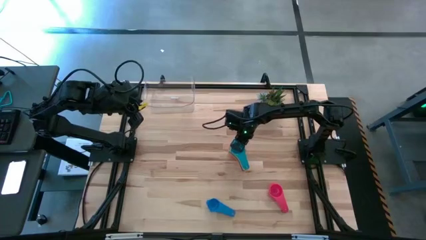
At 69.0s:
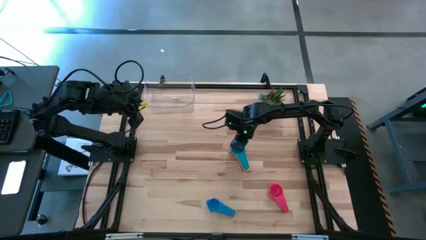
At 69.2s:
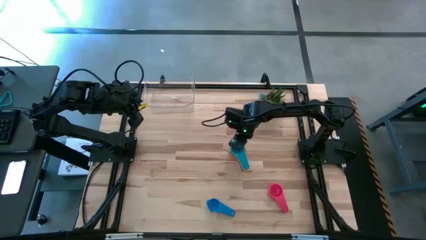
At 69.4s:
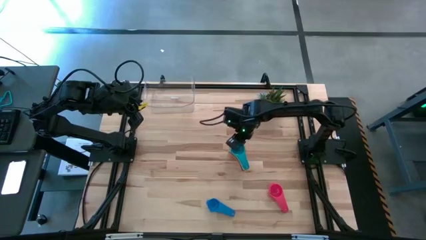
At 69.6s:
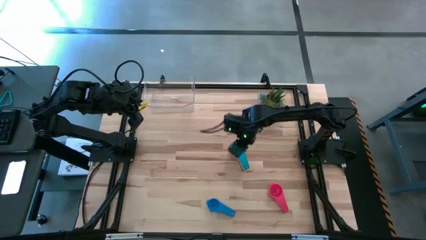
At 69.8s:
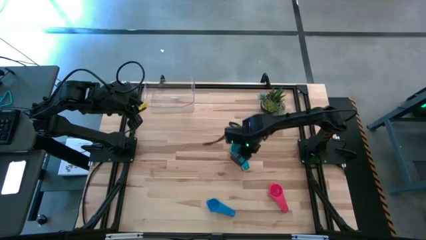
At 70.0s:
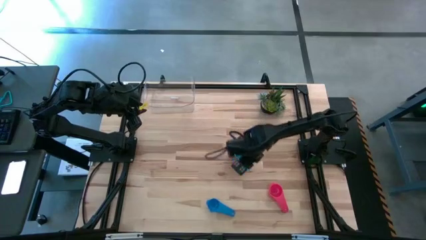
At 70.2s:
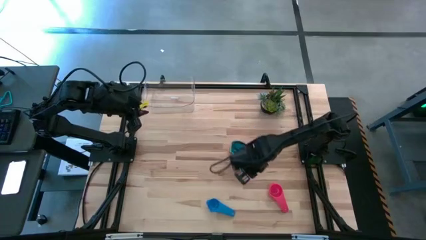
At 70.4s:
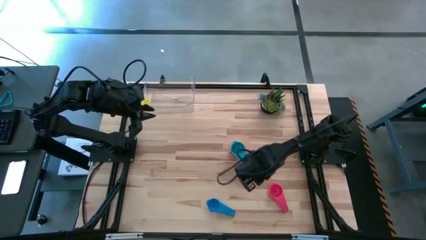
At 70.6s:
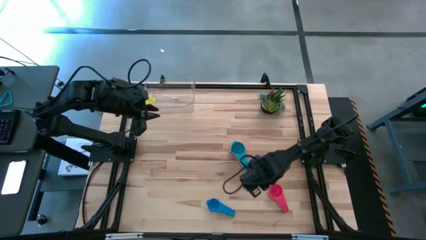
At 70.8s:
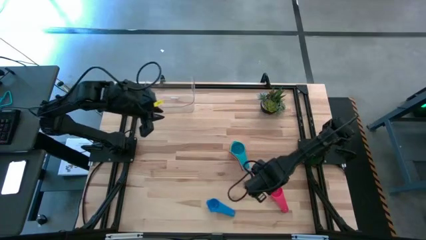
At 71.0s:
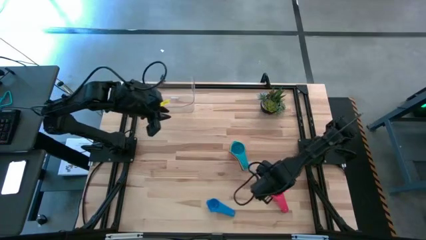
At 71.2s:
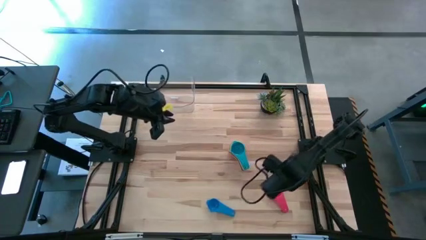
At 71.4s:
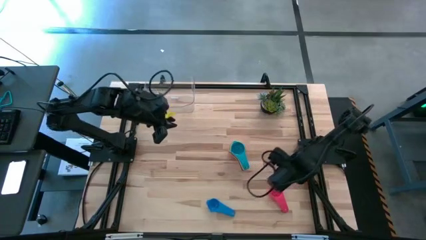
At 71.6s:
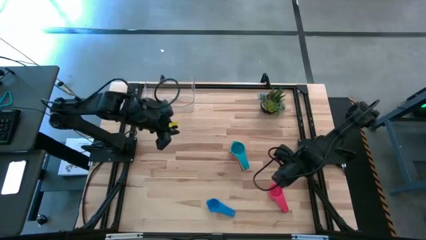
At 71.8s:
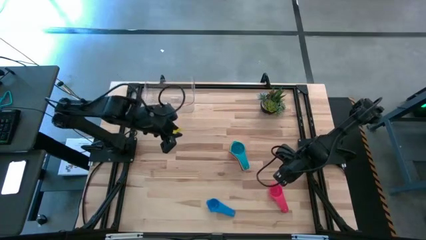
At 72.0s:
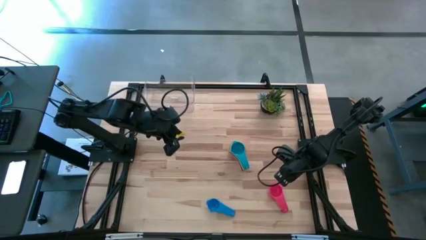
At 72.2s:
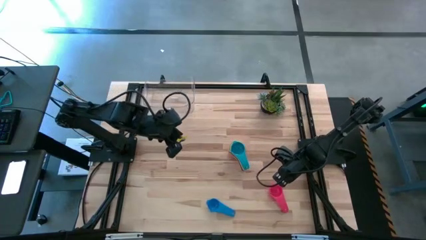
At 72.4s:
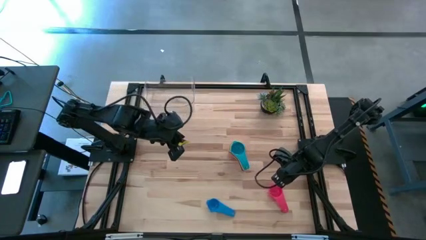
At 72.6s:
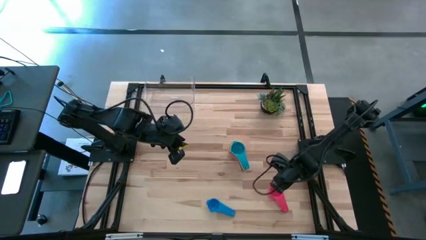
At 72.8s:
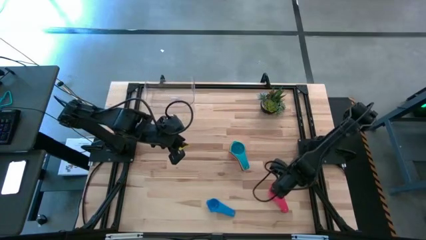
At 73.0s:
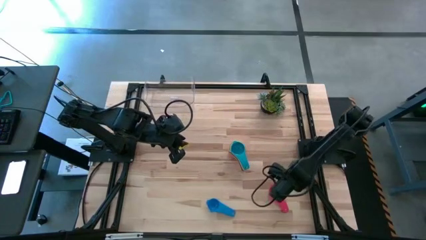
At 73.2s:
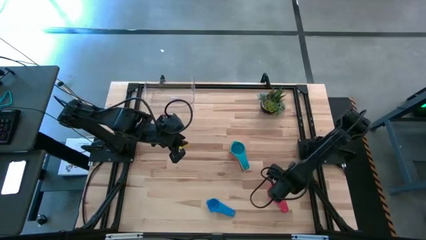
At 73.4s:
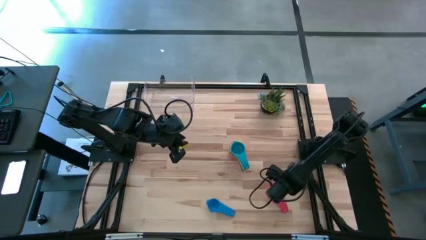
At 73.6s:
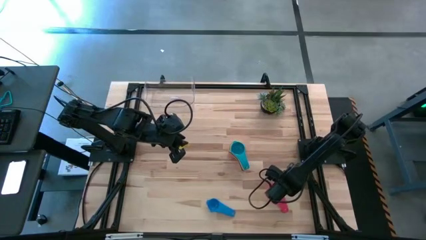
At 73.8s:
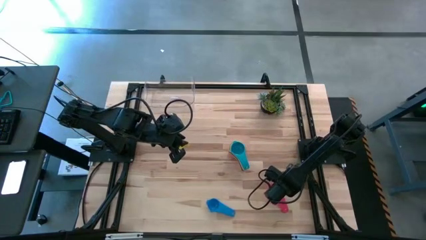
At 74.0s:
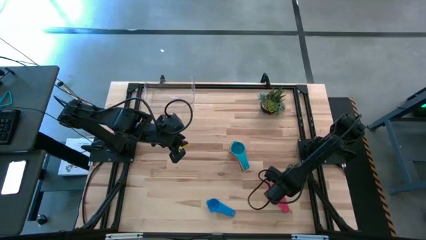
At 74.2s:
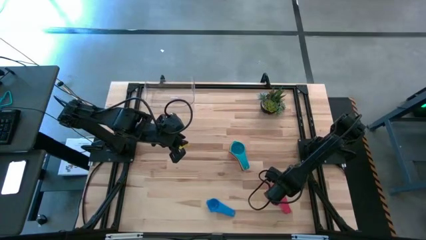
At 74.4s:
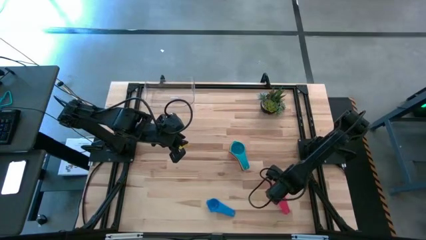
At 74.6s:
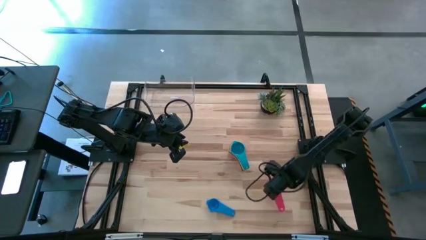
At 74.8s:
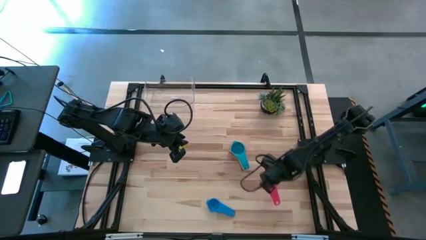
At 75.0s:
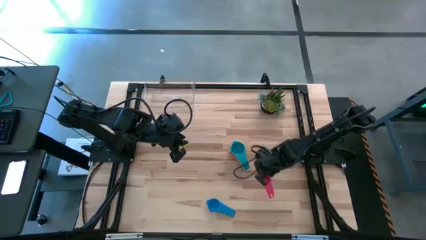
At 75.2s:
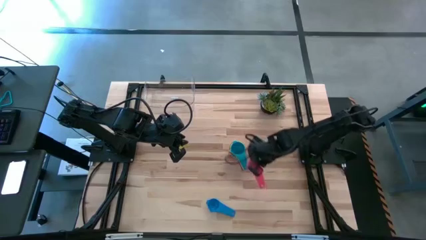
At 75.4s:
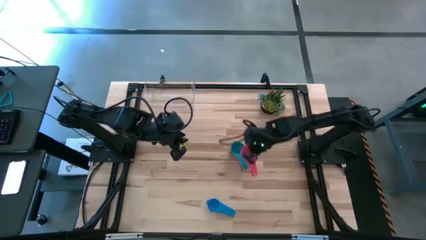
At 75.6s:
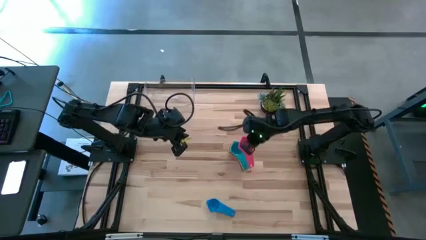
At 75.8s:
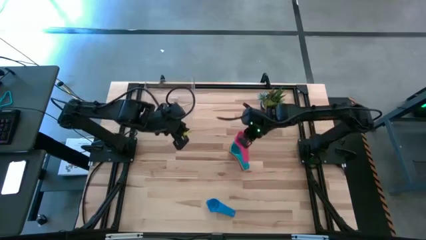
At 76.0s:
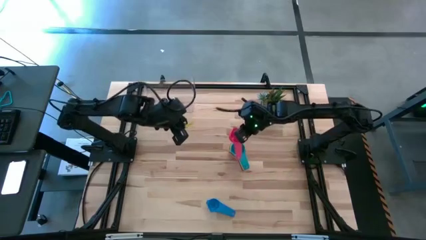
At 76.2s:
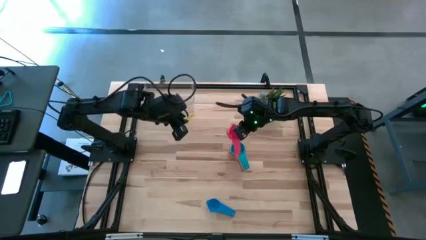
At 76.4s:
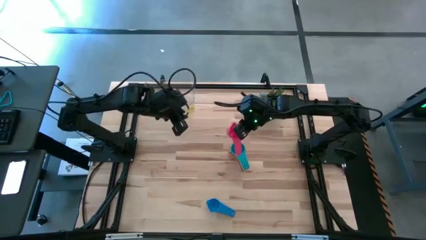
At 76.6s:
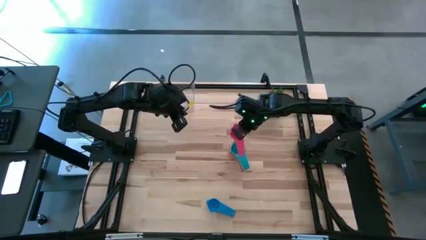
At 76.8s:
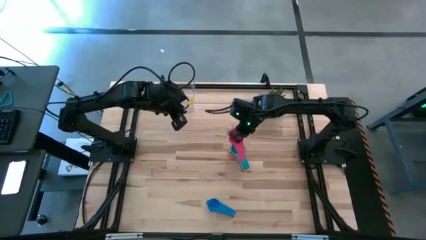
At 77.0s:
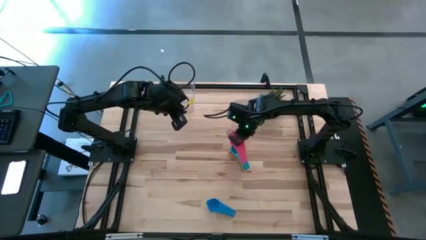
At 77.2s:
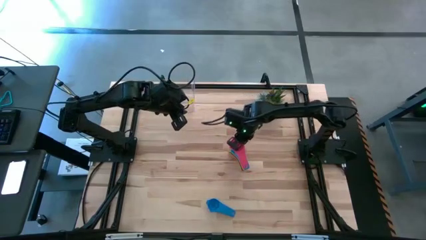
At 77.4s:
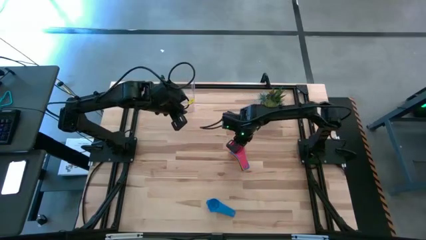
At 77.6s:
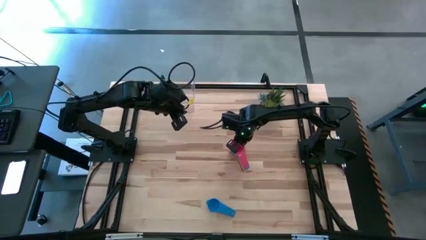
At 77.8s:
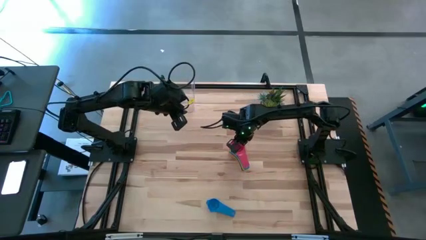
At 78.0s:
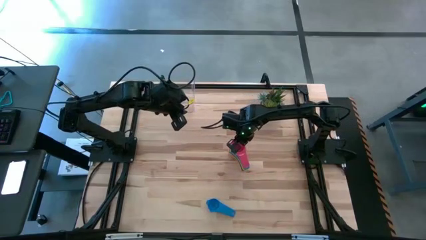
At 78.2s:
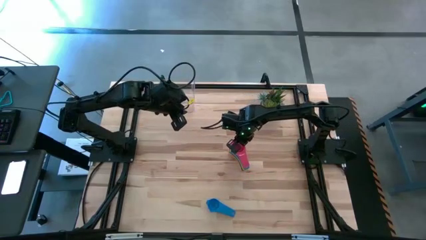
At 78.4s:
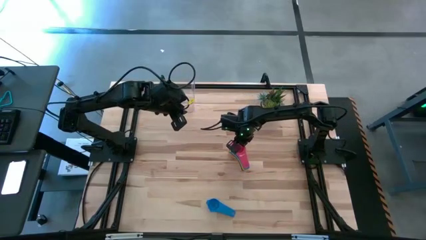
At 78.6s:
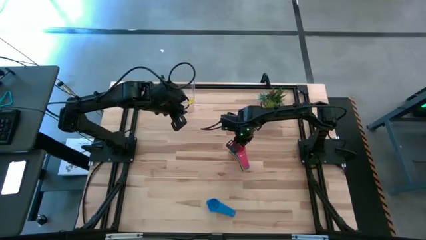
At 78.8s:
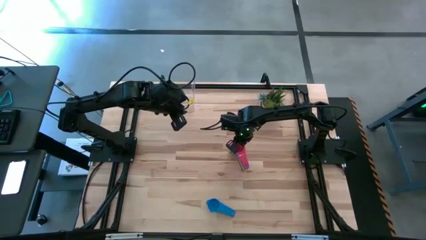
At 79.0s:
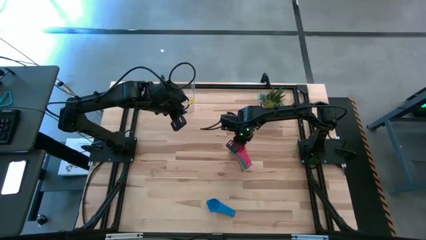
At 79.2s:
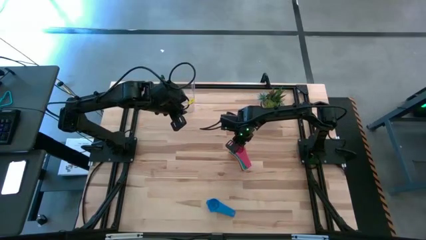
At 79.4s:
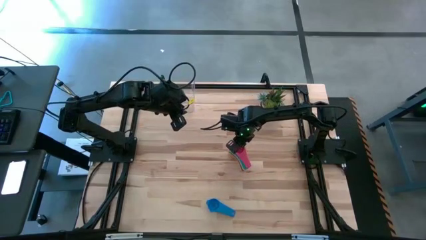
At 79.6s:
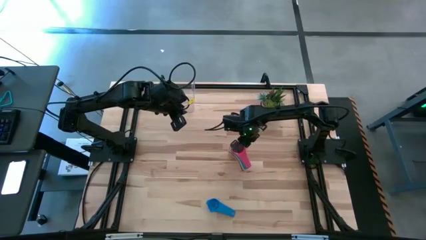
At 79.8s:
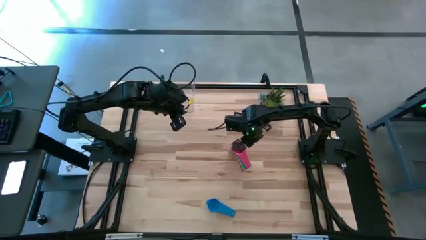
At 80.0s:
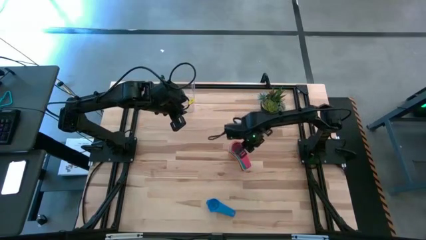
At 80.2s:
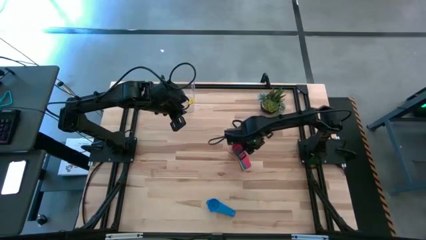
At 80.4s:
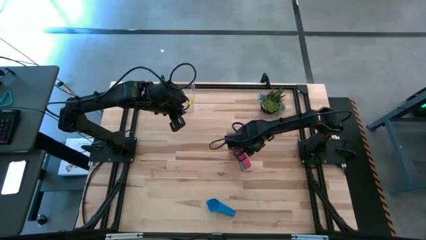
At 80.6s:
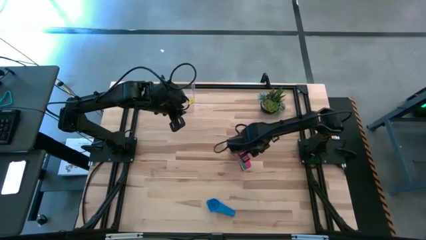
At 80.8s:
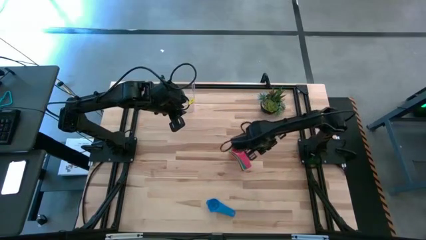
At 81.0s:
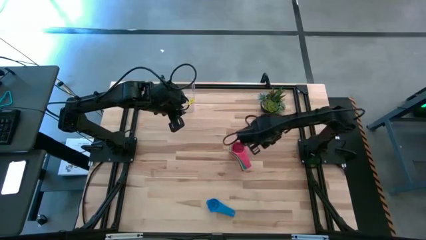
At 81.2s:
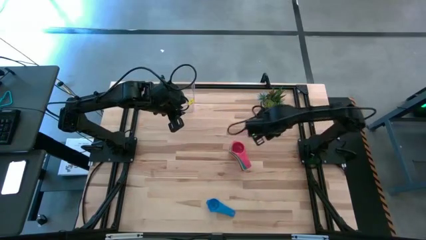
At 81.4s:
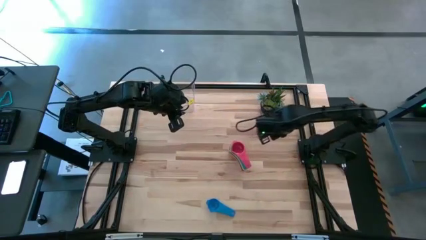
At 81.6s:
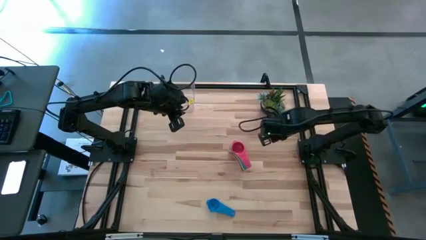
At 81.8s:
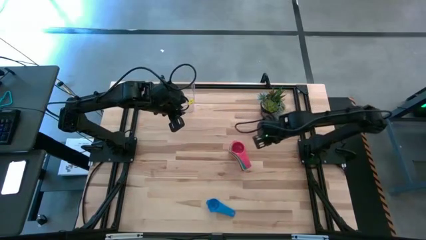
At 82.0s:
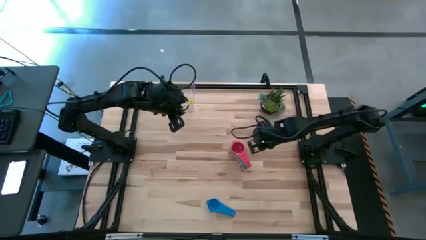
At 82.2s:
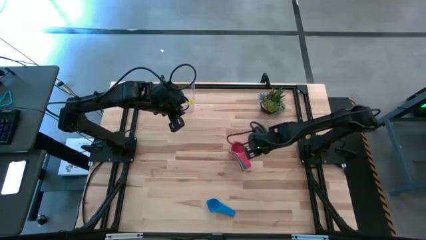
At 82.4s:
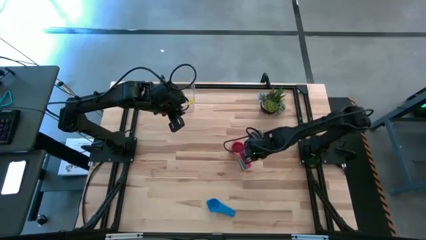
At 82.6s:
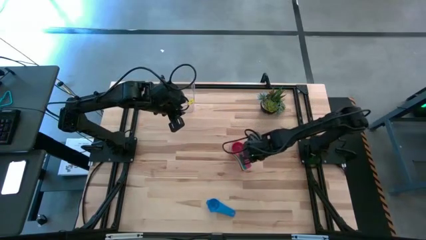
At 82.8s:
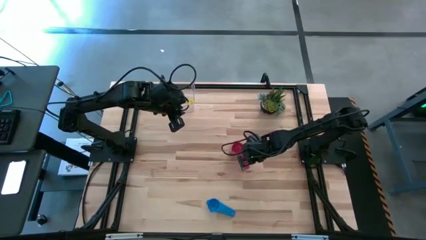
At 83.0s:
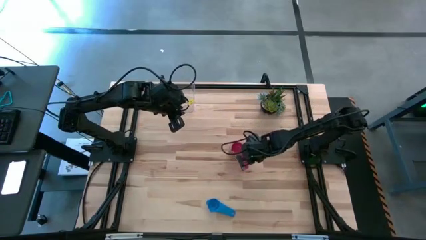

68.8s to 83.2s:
Task: Nest measuring cups in basket
Stack the light red measuring cup on top of the light blue measuring cup
